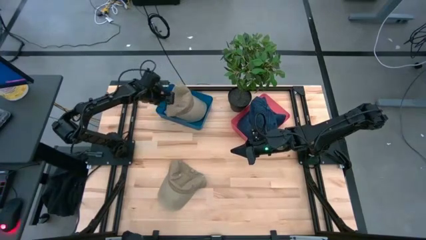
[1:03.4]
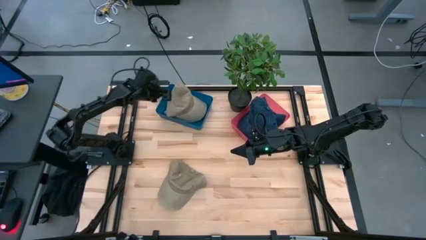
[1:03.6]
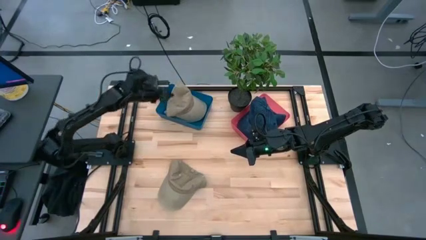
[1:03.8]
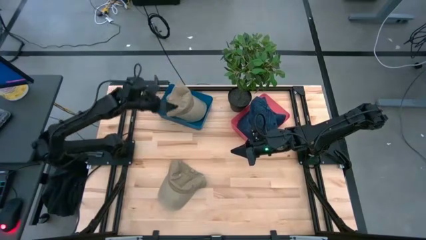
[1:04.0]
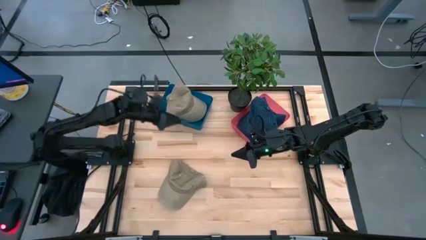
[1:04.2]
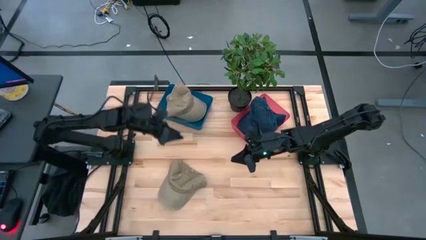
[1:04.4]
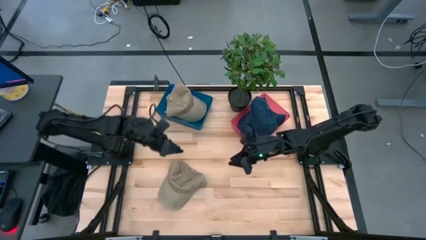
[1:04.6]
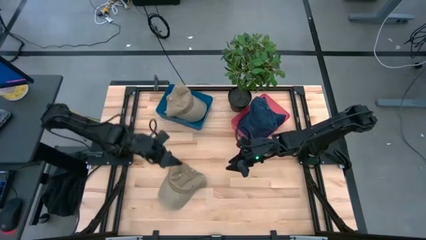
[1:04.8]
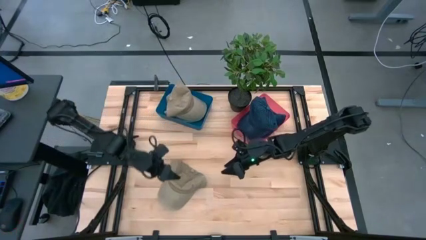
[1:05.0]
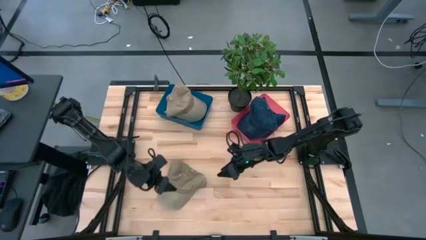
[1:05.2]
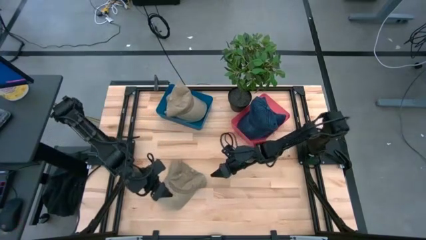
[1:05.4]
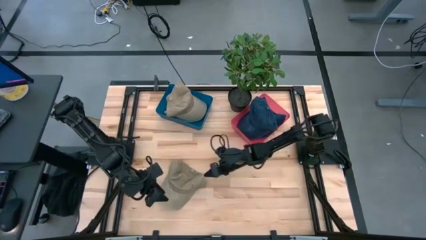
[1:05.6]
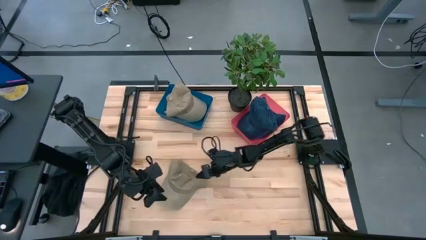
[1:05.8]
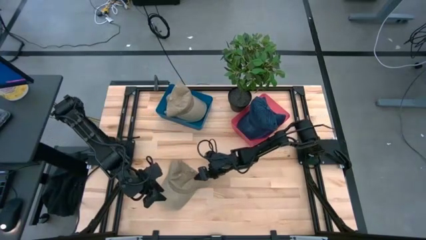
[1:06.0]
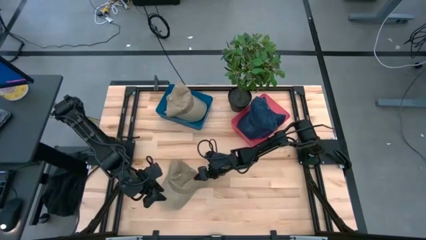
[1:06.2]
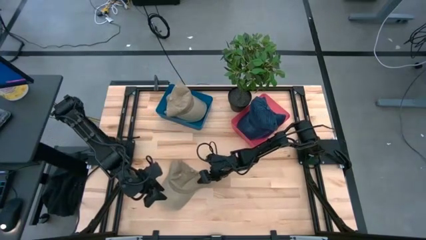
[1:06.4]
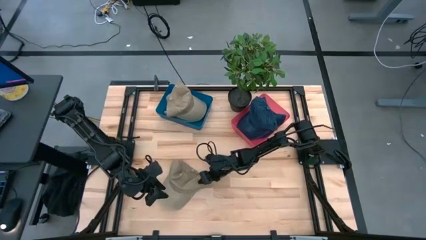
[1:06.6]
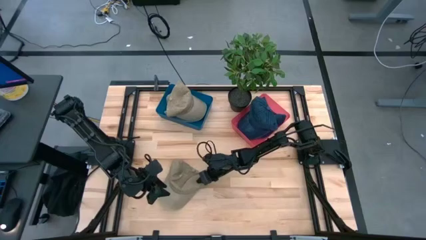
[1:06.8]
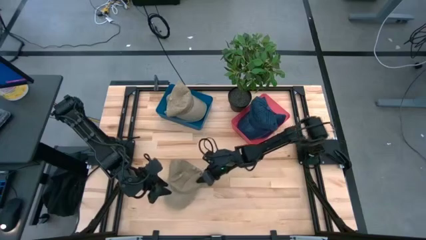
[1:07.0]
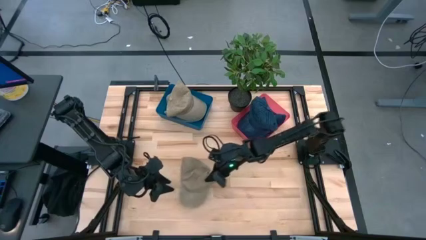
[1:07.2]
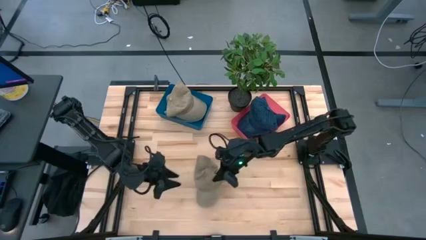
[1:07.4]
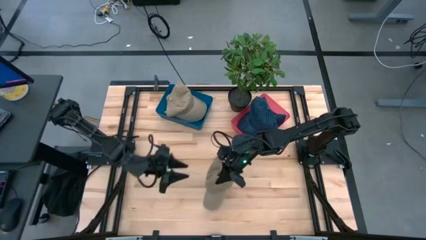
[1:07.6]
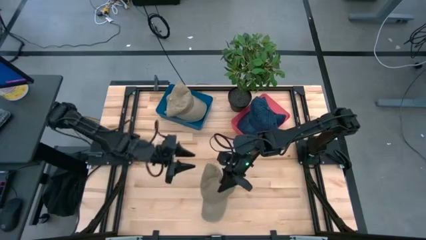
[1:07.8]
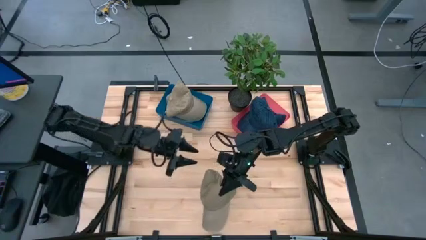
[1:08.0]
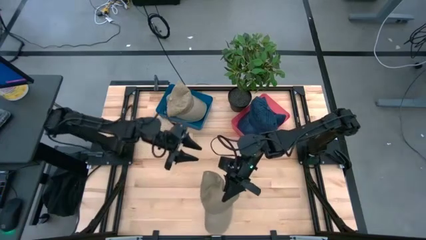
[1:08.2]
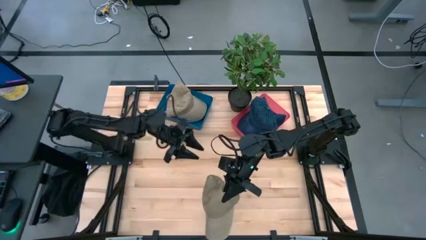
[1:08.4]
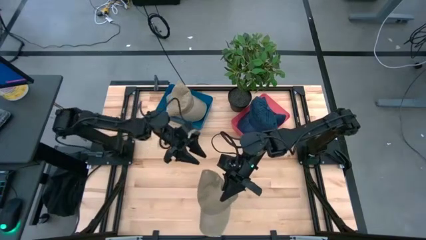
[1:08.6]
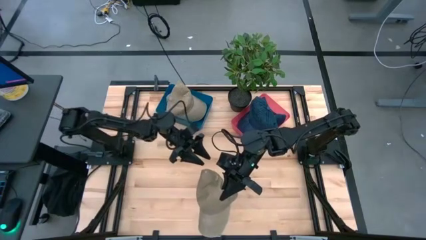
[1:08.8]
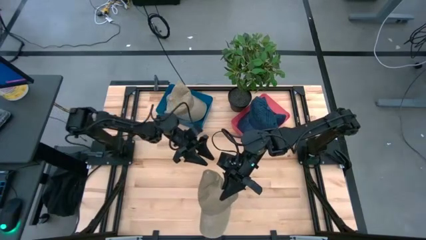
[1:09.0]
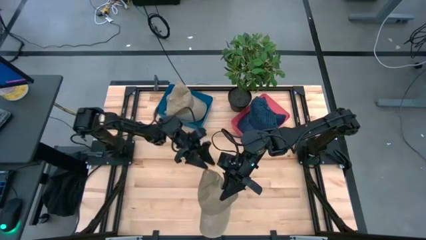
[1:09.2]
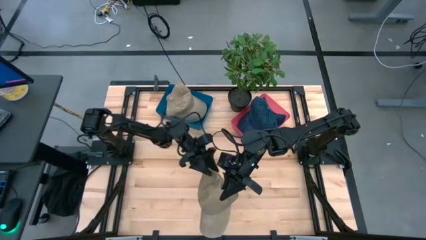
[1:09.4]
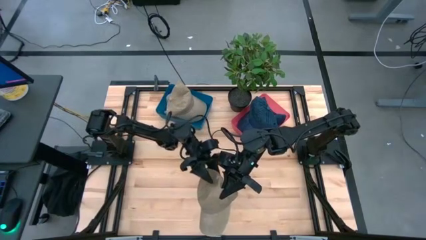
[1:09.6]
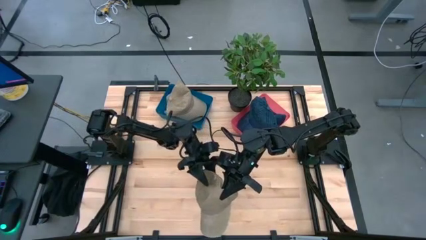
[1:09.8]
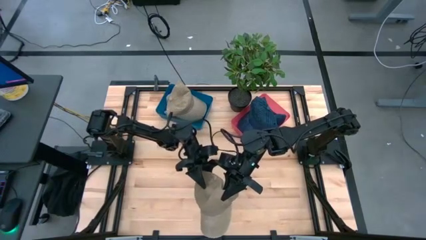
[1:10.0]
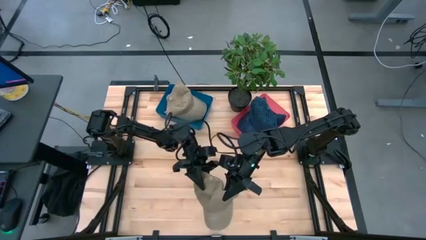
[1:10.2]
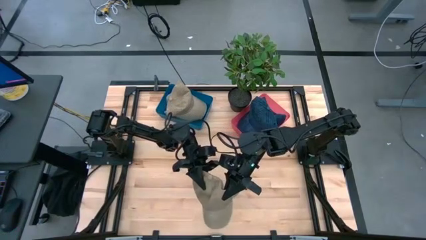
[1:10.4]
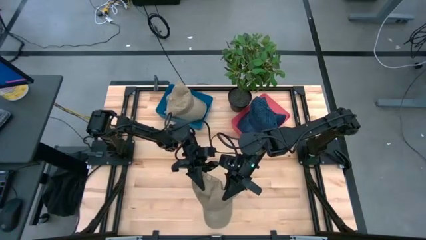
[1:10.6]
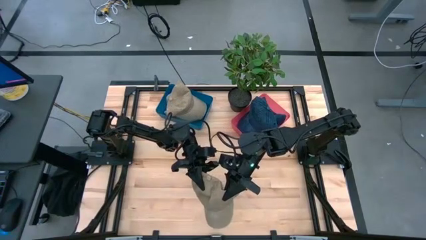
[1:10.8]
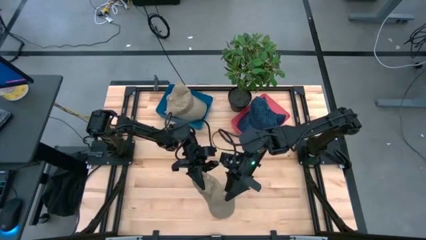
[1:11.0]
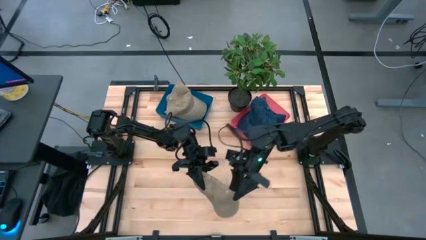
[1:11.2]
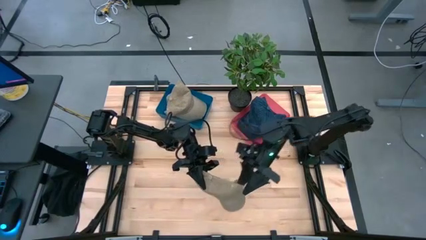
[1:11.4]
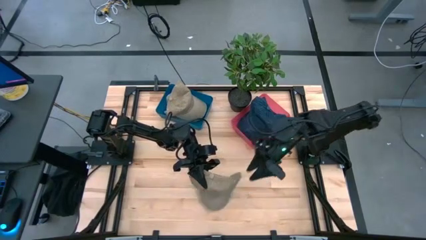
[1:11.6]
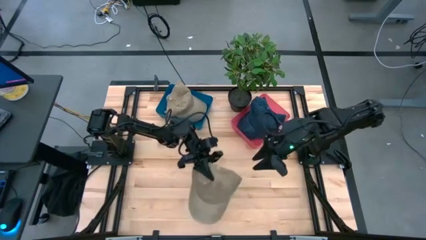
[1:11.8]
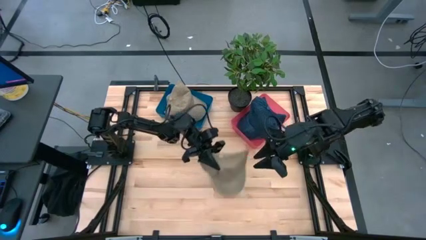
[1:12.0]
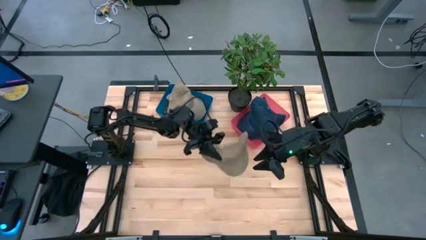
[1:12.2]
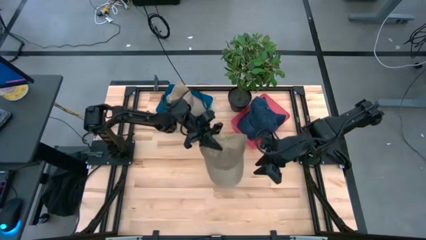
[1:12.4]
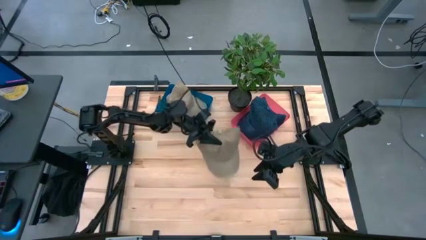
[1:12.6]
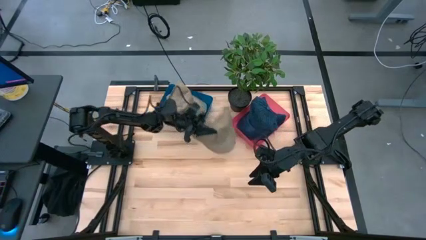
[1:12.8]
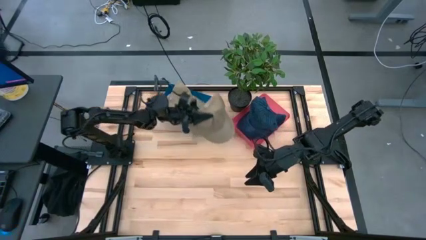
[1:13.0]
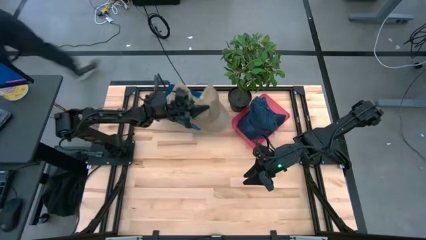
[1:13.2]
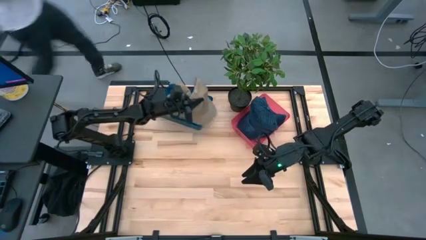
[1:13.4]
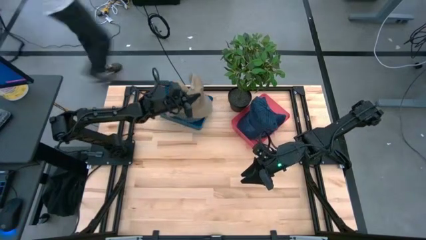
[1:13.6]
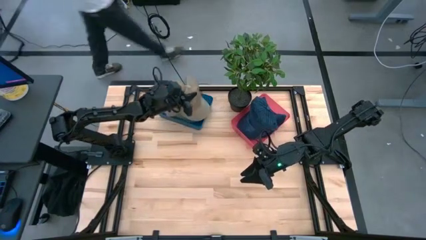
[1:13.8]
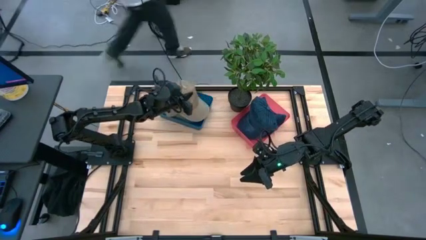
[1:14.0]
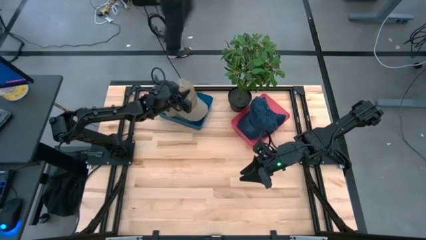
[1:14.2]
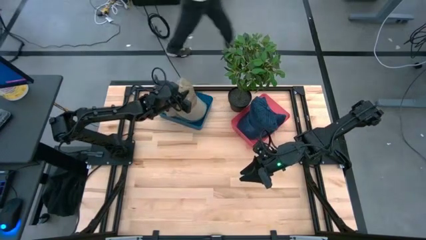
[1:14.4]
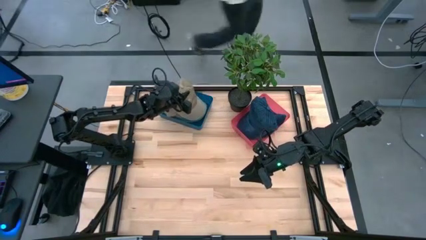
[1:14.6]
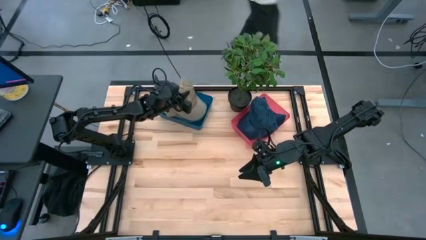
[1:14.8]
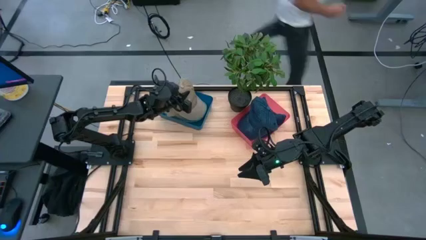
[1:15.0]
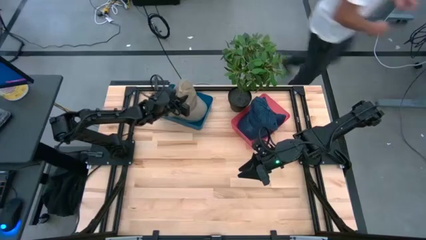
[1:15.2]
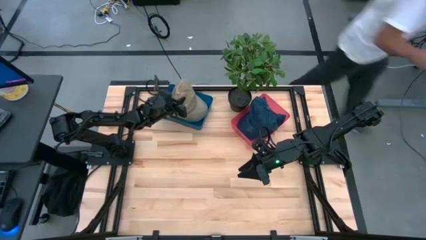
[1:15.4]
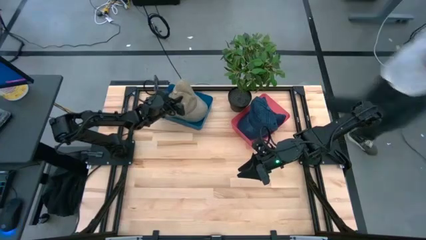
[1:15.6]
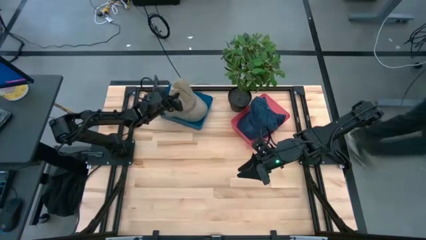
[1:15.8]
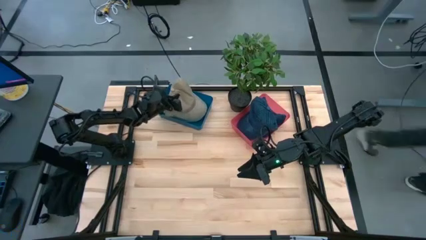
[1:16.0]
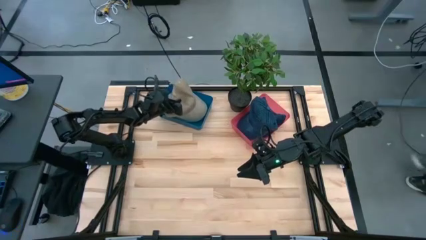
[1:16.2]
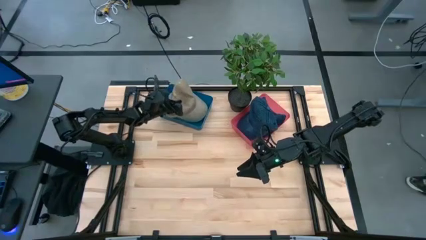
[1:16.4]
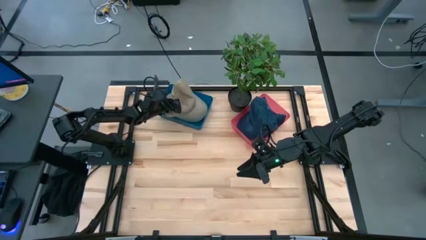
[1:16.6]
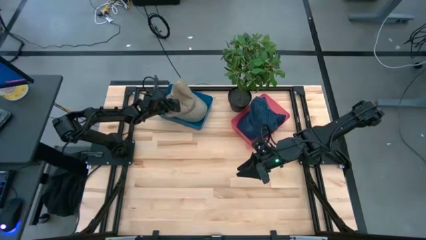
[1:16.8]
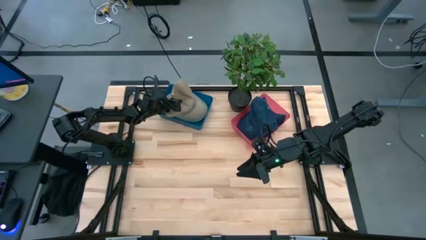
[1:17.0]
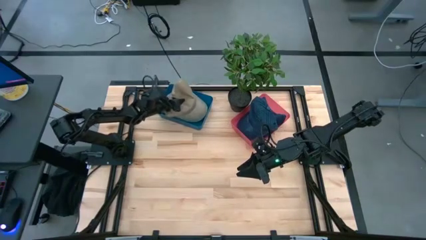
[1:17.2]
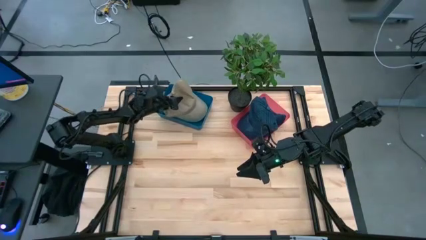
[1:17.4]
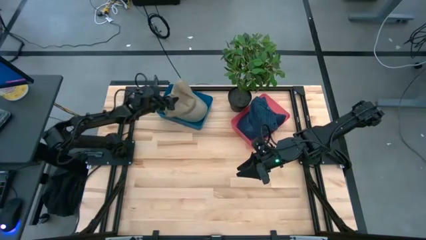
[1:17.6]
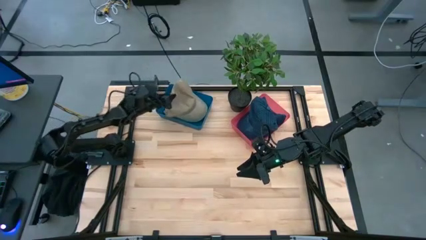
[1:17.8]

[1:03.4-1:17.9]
Task: Pick & Place hat
Put the brown cap into the blue bin
